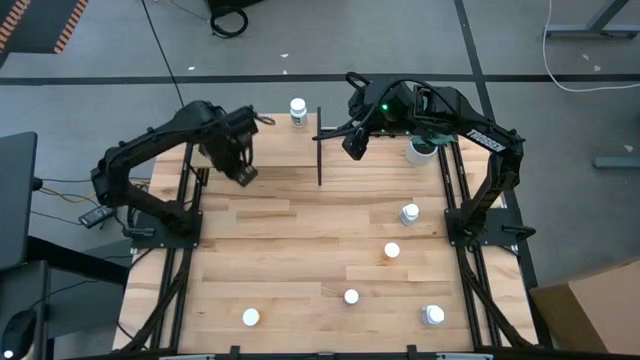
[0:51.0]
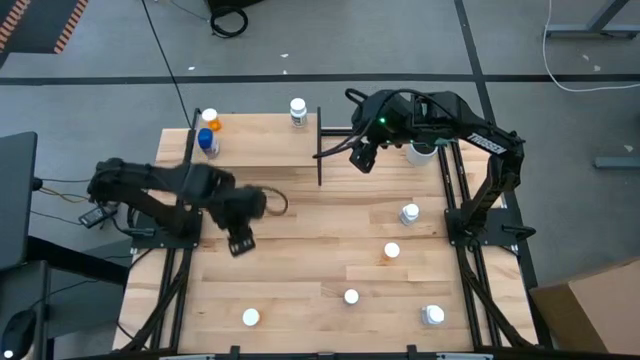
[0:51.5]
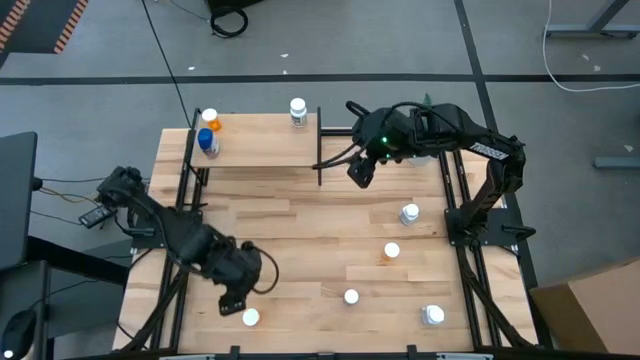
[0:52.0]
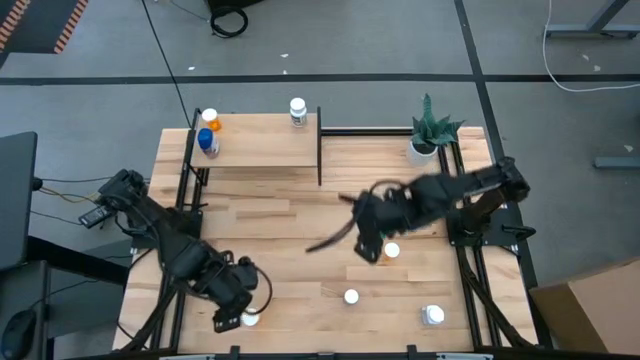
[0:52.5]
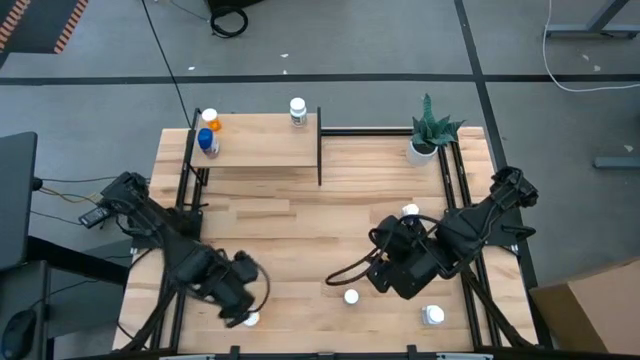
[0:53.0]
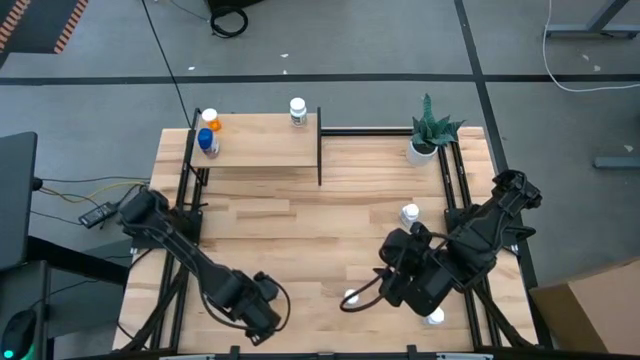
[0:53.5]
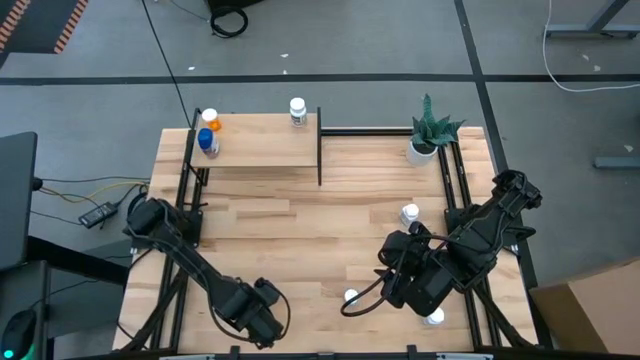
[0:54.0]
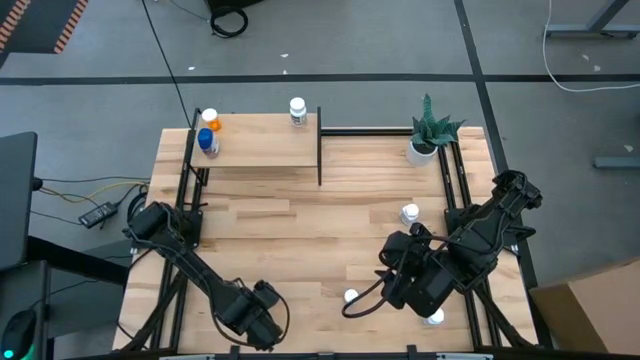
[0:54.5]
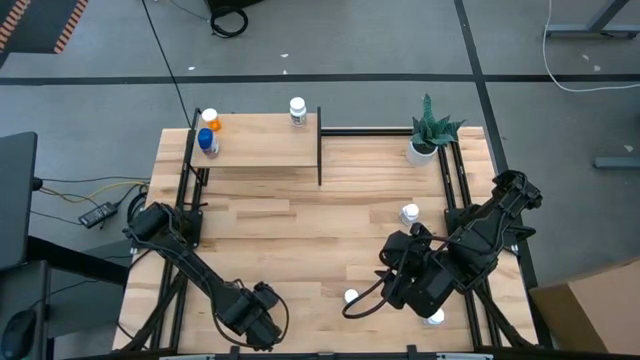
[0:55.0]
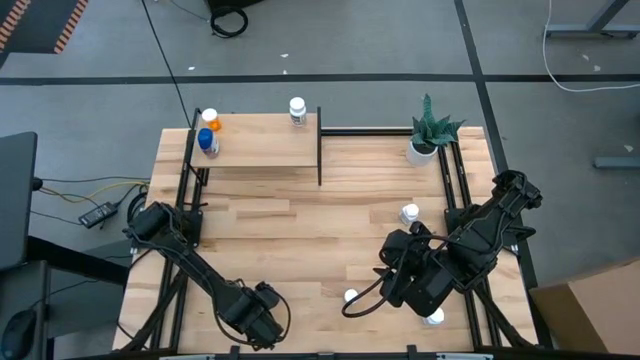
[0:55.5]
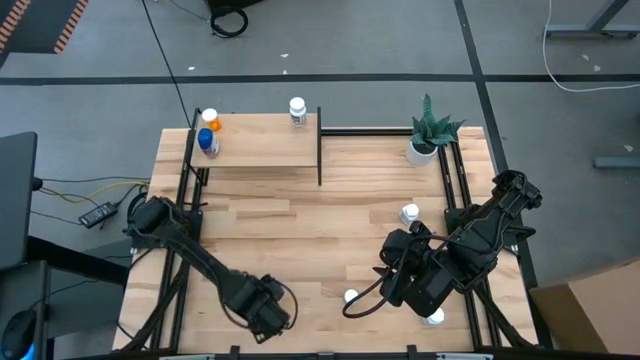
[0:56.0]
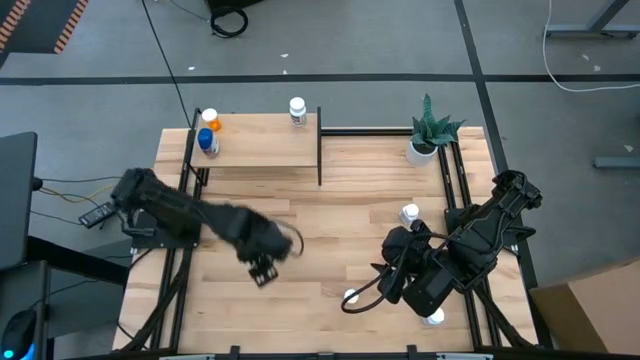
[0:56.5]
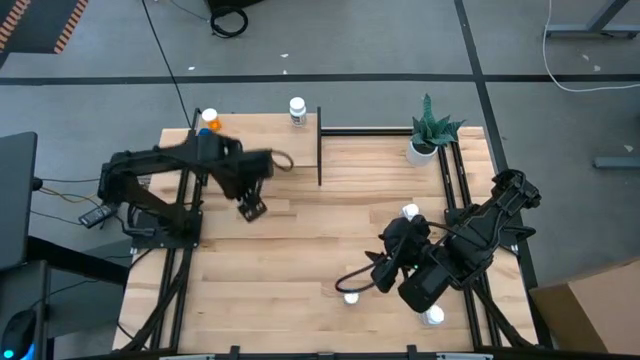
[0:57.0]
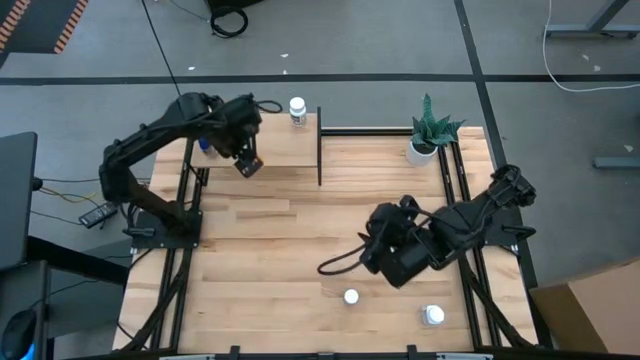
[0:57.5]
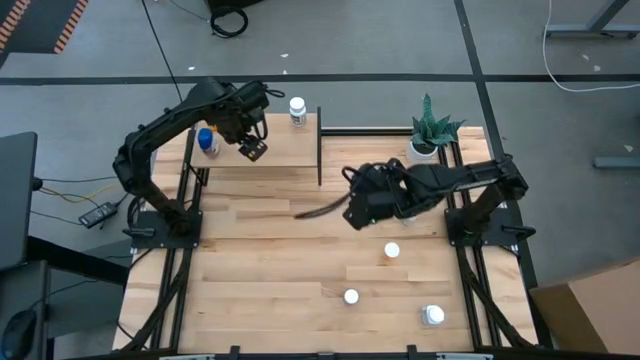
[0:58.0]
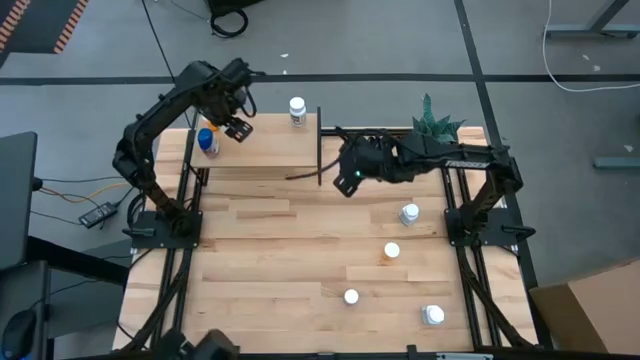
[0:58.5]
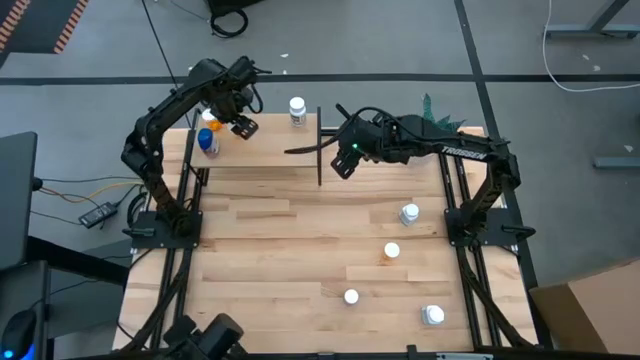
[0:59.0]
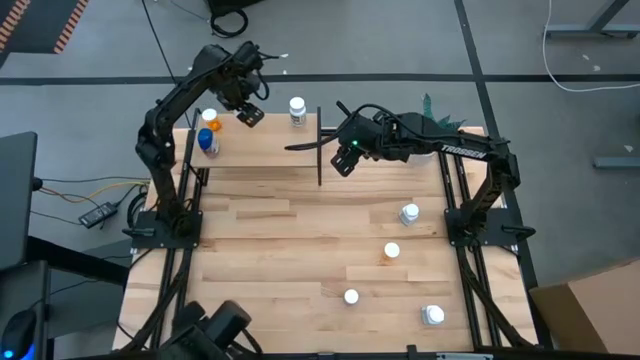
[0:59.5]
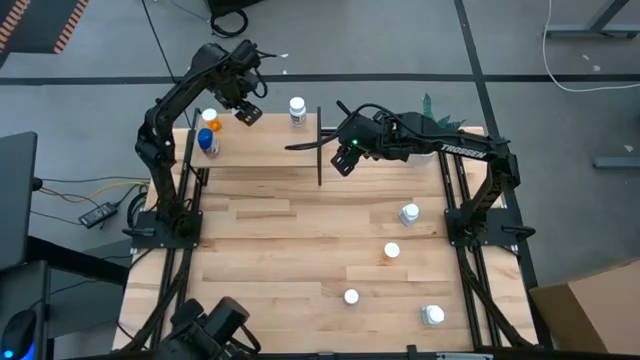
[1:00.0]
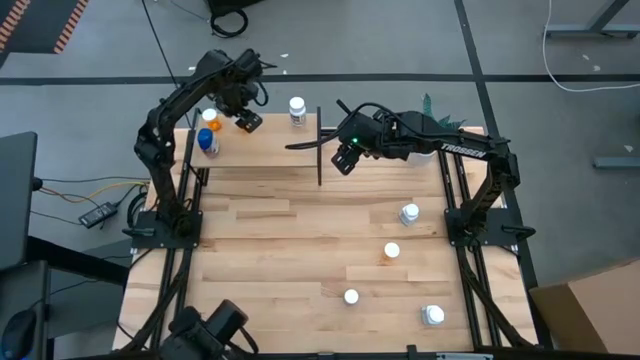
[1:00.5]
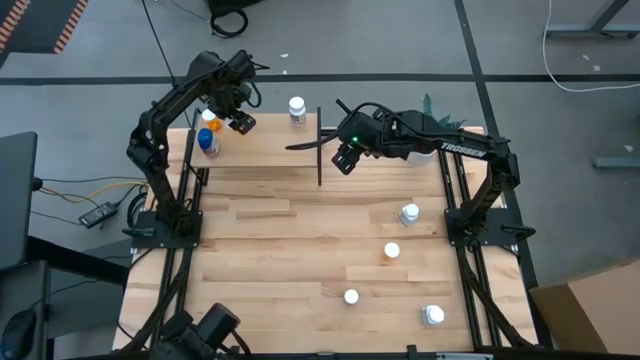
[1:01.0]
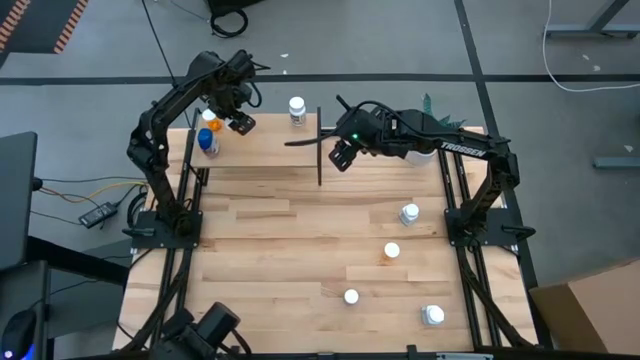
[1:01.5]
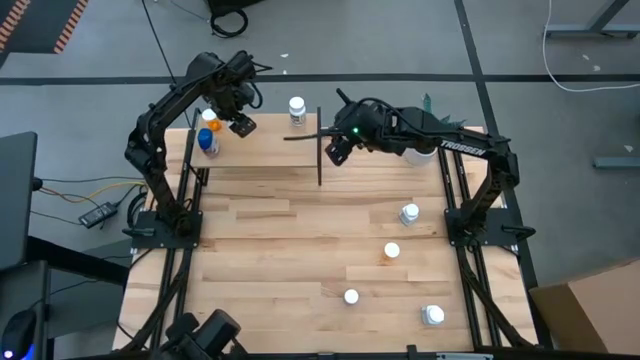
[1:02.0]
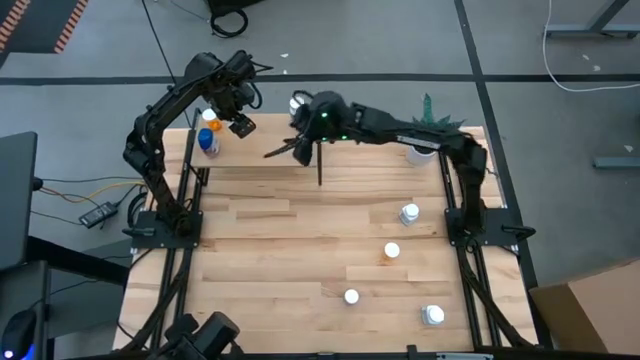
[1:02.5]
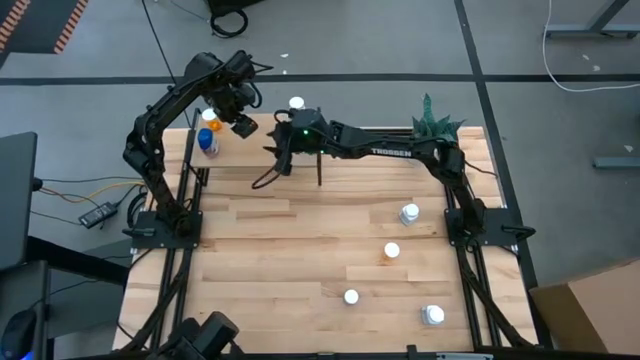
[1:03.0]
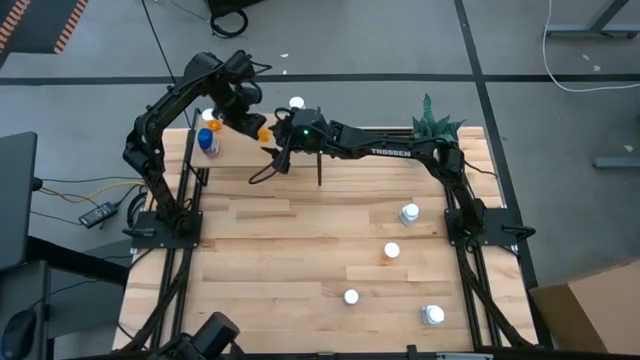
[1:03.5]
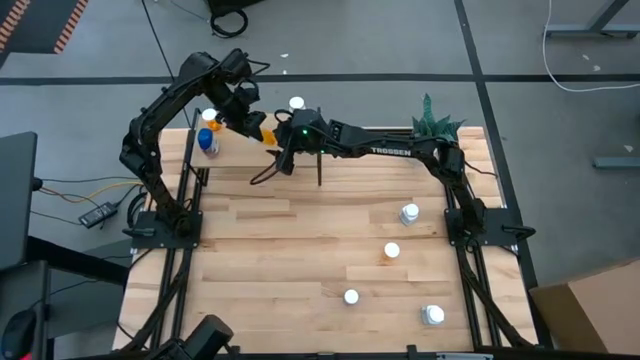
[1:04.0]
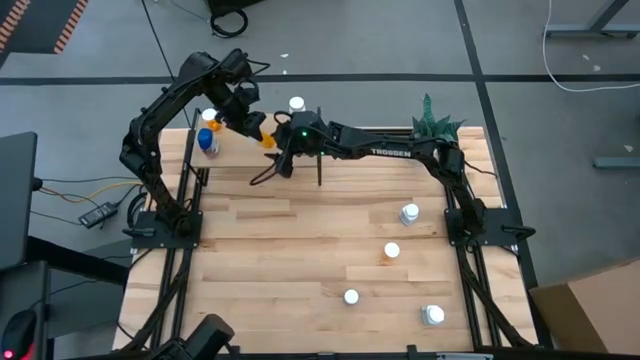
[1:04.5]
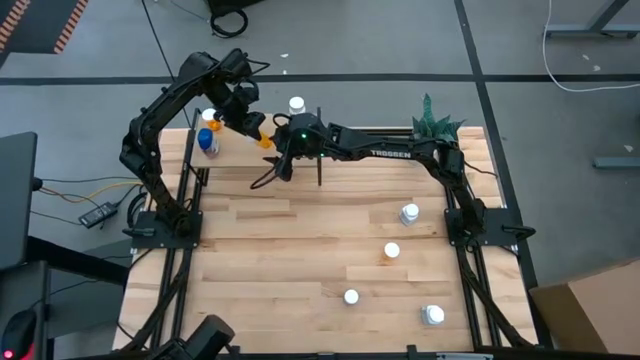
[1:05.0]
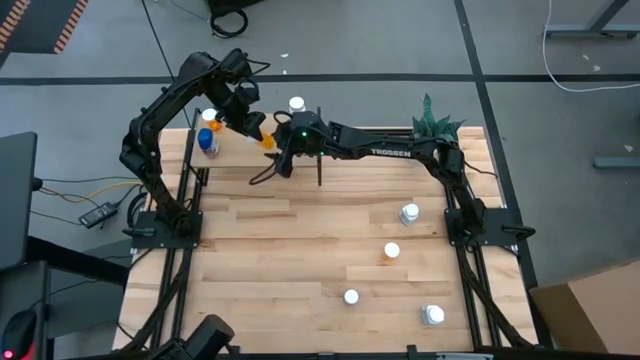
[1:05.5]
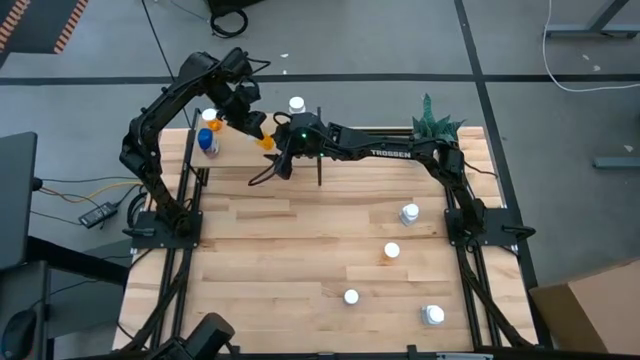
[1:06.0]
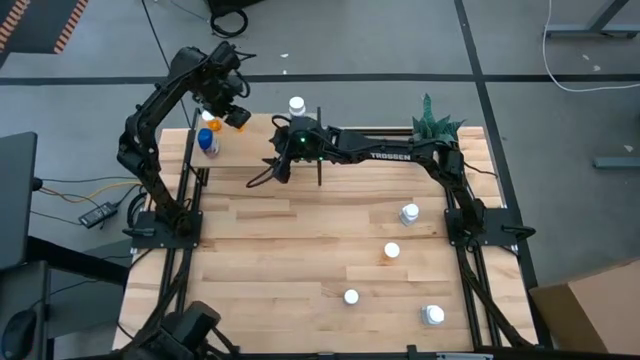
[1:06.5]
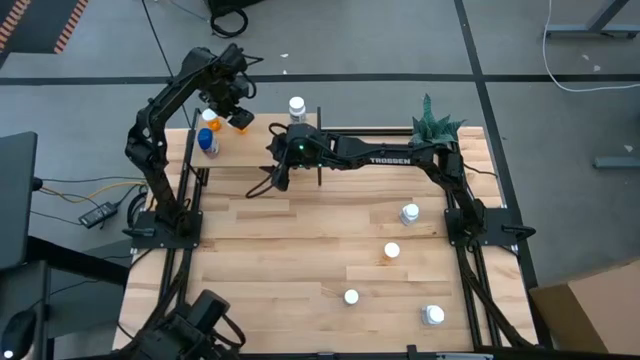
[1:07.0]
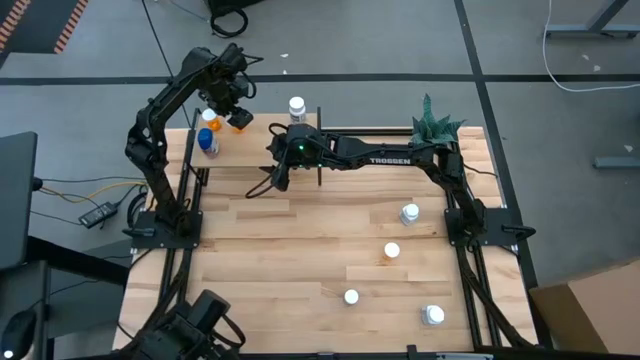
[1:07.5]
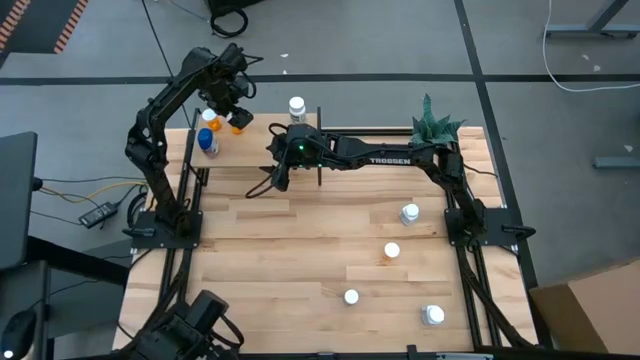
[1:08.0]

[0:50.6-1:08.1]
Task: Pick and place medicine bottles onto shelf by color
Put the left orange pill bottle on the shelf

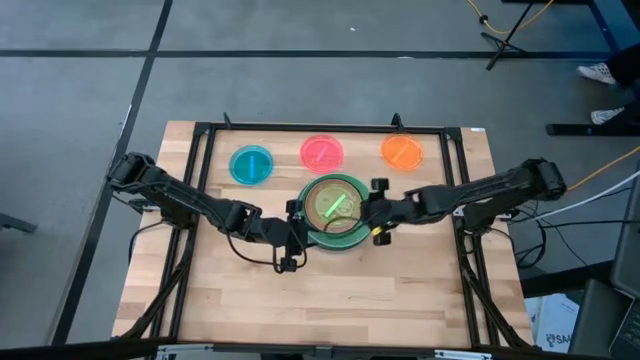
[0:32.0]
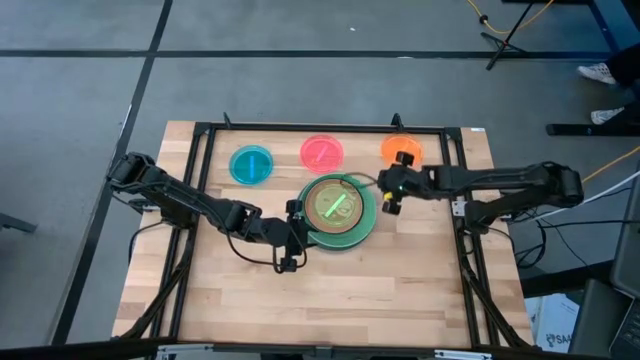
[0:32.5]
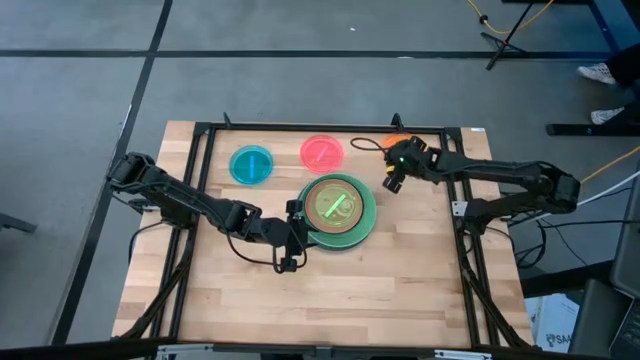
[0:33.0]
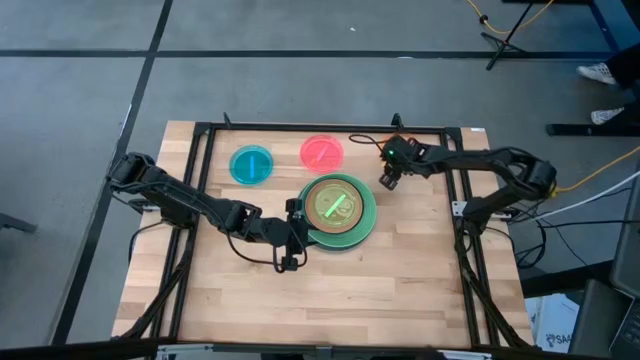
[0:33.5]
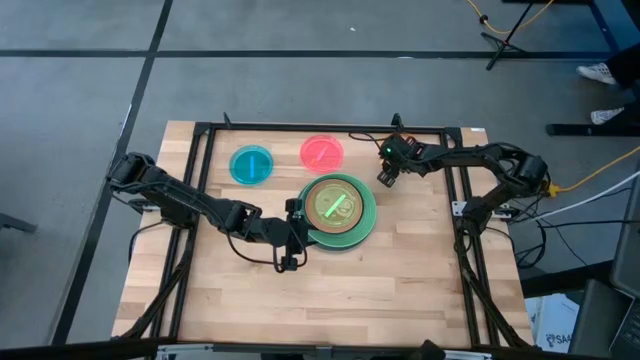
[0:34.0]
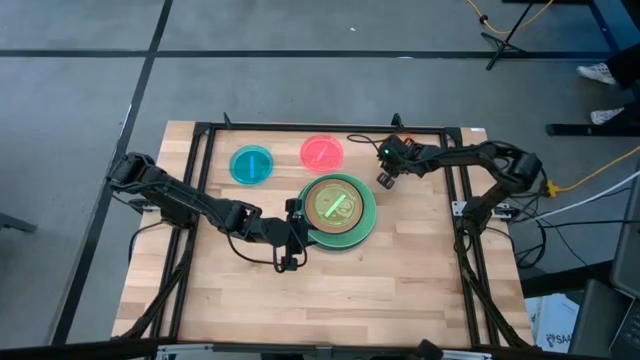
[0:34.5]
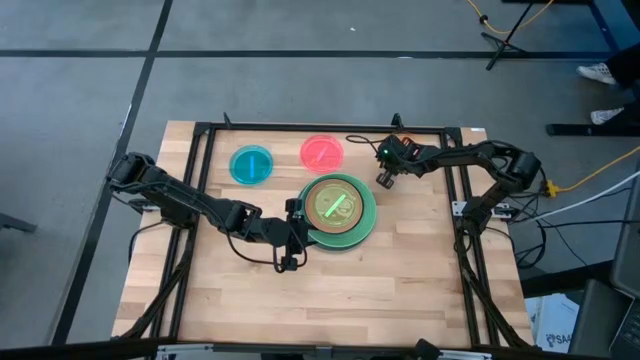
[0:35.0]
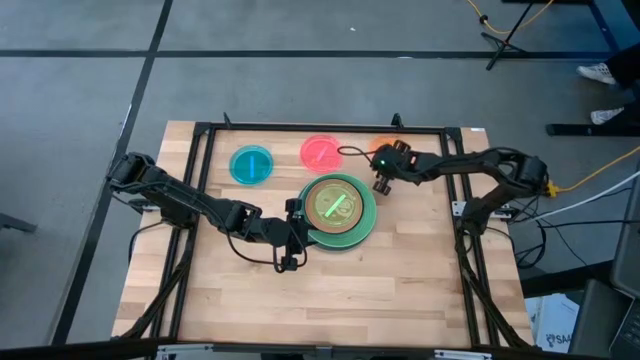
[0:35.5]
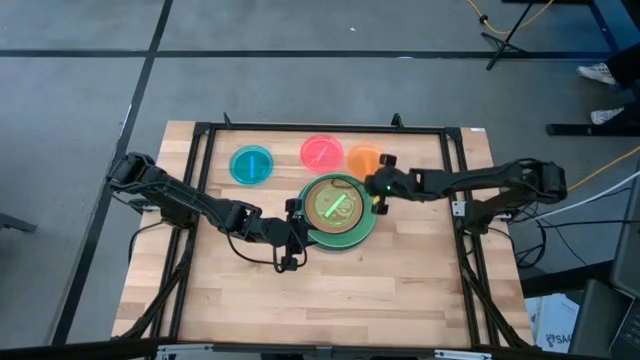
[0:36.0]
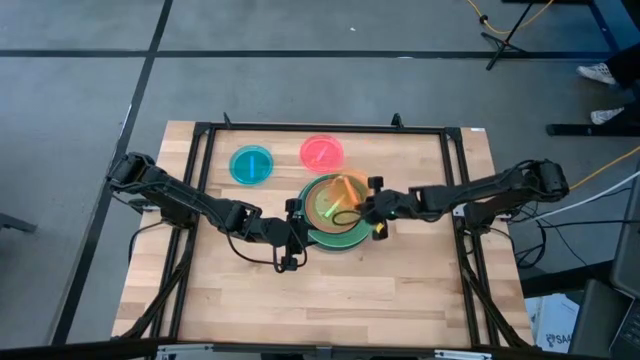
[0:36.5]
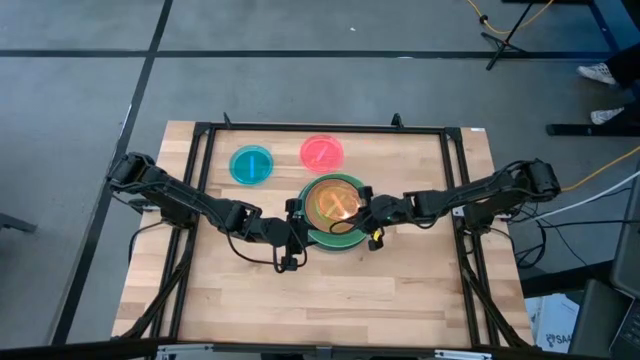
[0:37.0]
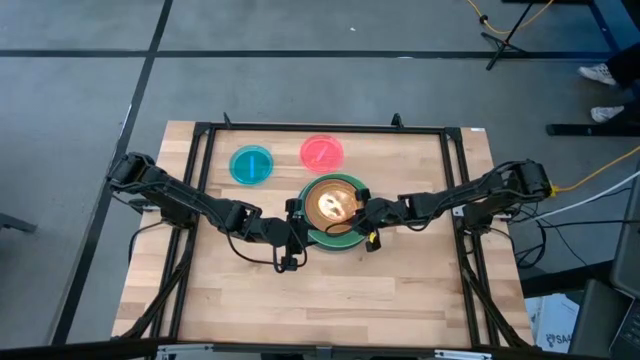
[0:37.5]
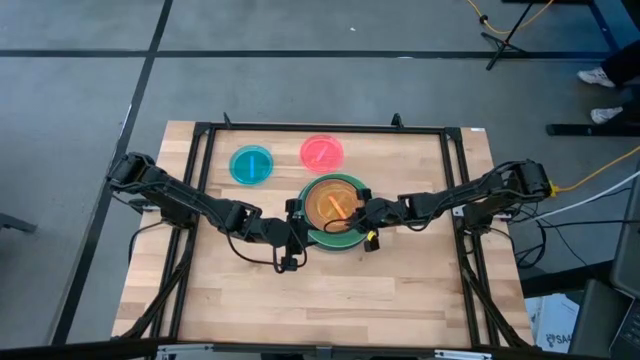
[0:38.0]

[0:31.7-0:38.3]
Task: Stack plastic plates
Stack the orange plate on top of the green plate
